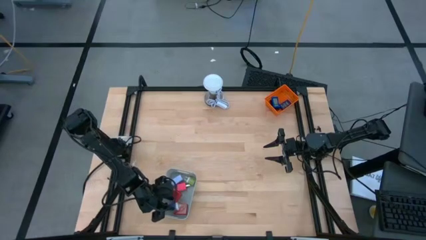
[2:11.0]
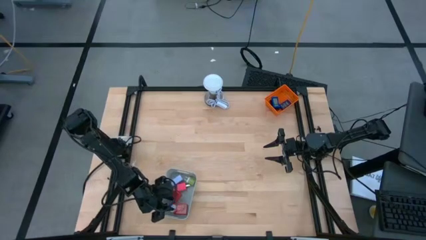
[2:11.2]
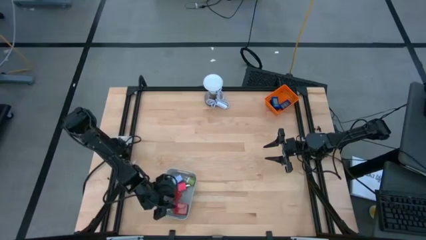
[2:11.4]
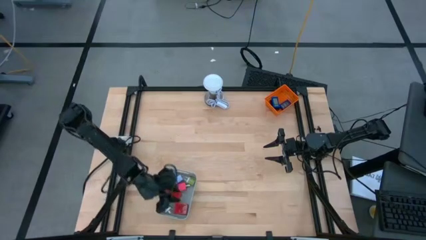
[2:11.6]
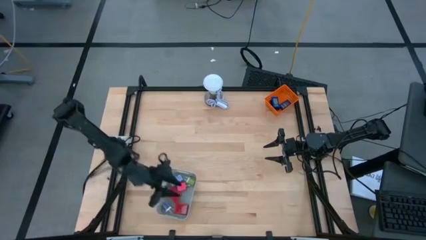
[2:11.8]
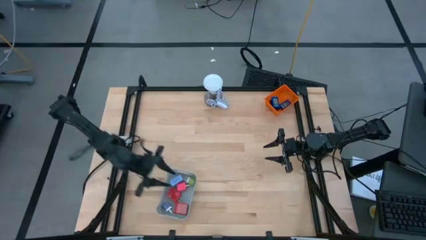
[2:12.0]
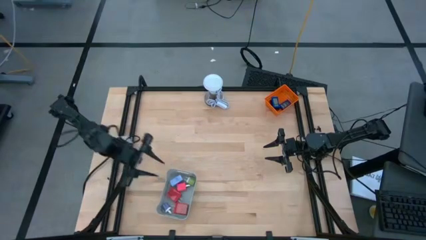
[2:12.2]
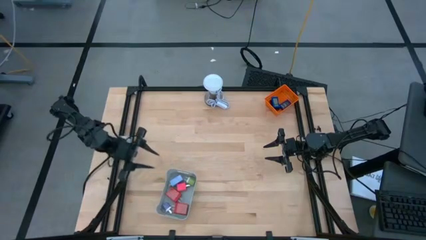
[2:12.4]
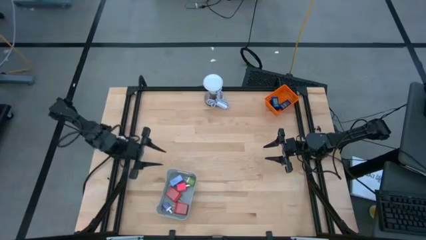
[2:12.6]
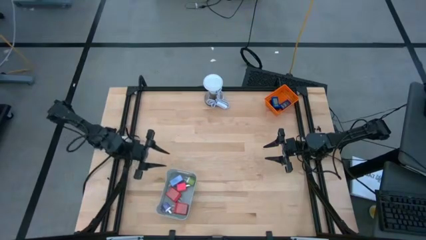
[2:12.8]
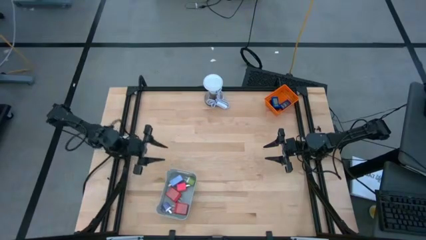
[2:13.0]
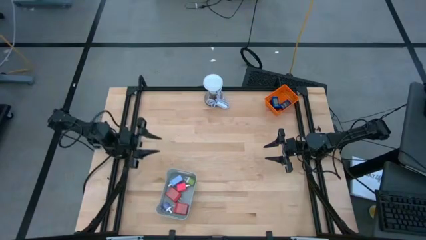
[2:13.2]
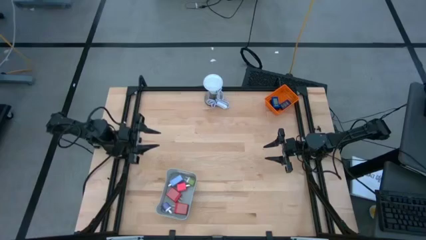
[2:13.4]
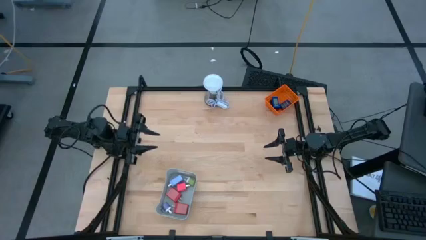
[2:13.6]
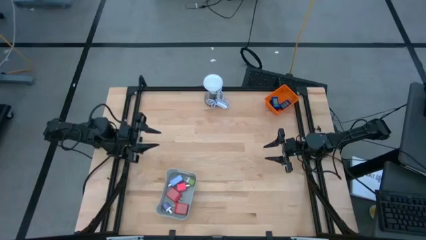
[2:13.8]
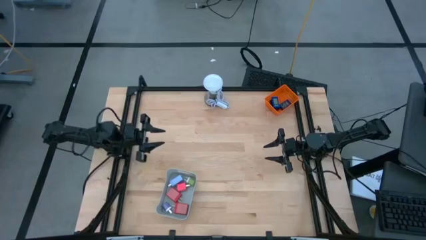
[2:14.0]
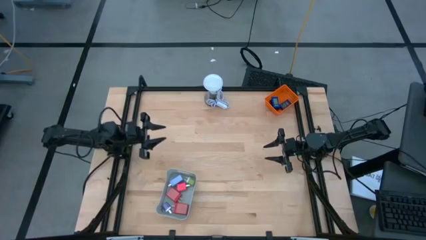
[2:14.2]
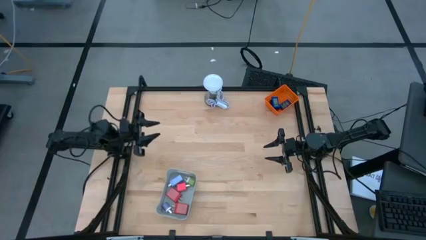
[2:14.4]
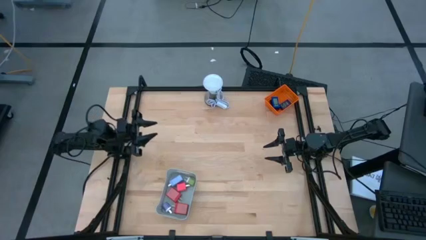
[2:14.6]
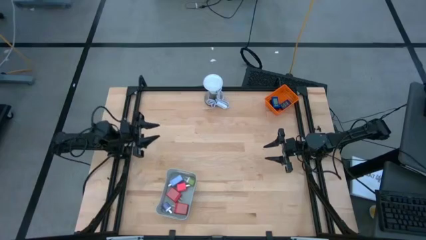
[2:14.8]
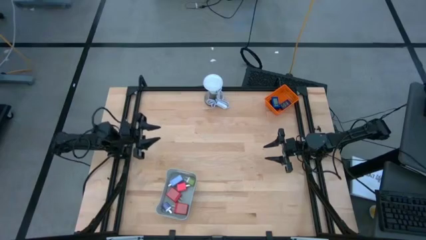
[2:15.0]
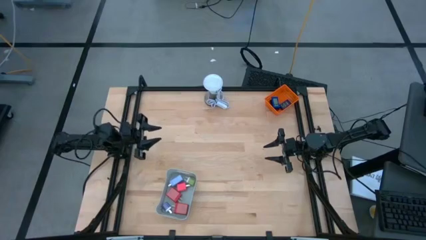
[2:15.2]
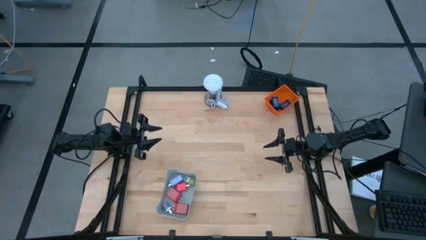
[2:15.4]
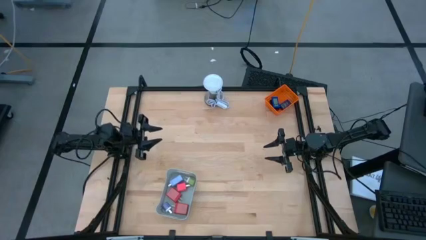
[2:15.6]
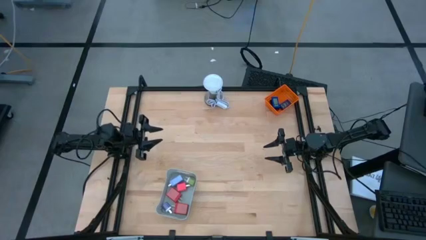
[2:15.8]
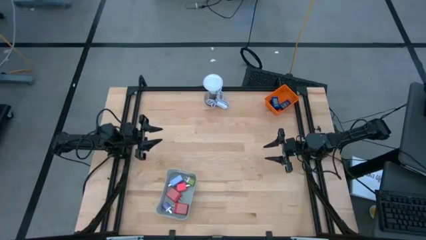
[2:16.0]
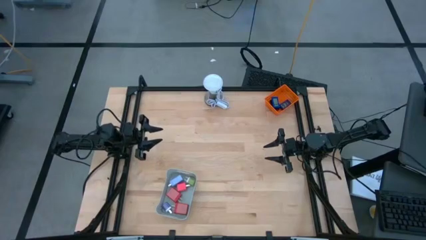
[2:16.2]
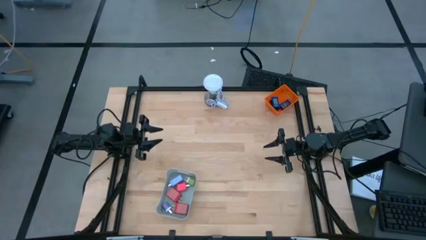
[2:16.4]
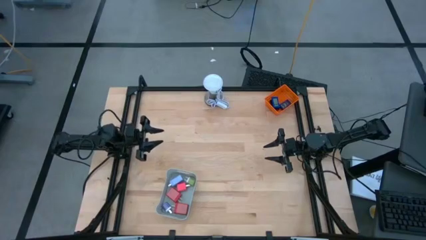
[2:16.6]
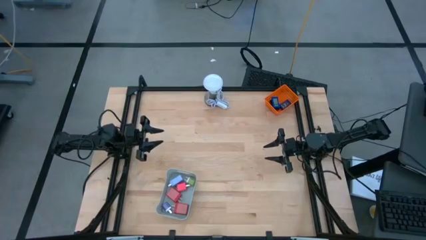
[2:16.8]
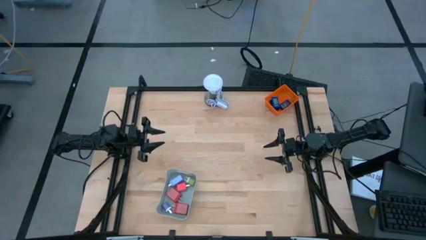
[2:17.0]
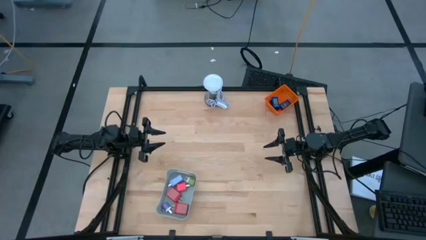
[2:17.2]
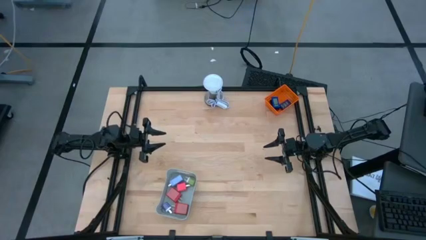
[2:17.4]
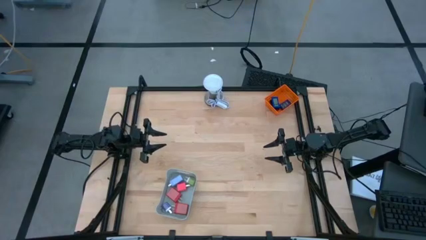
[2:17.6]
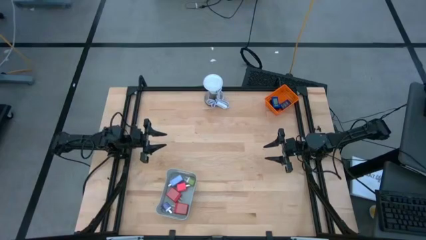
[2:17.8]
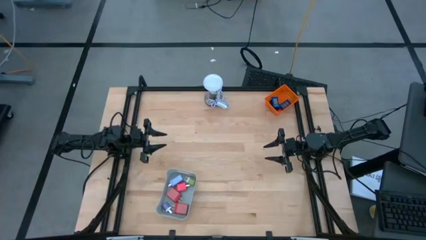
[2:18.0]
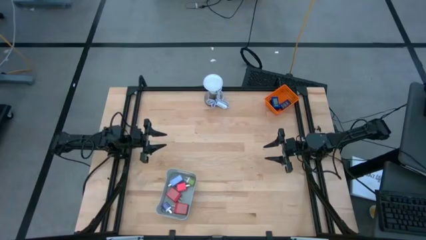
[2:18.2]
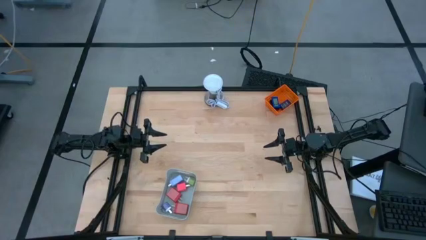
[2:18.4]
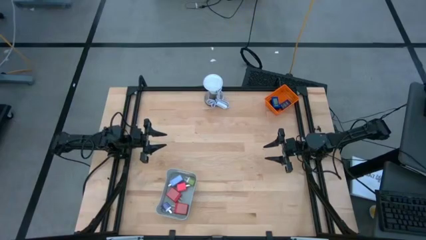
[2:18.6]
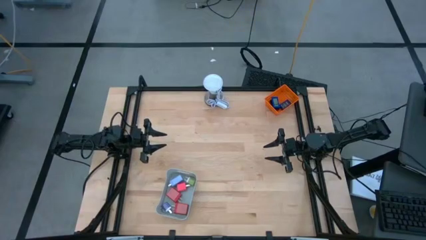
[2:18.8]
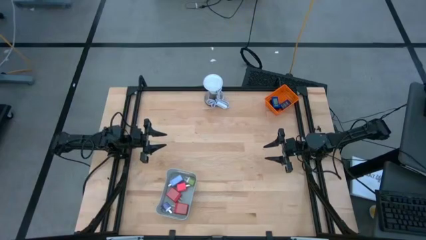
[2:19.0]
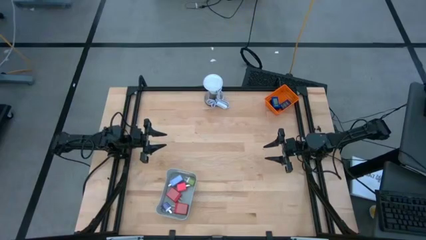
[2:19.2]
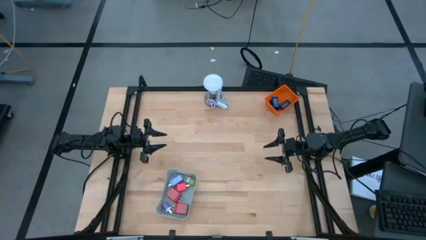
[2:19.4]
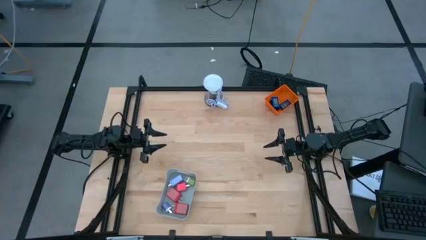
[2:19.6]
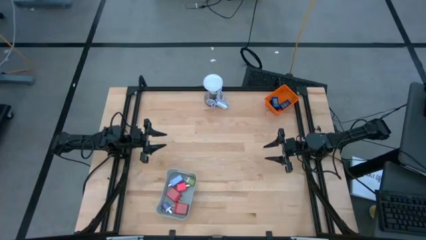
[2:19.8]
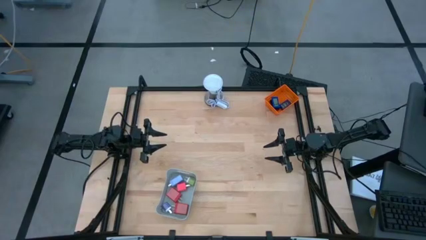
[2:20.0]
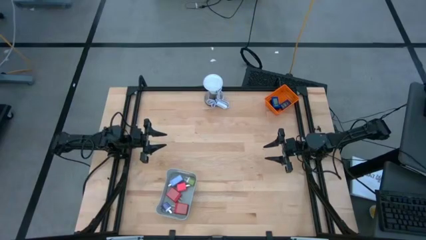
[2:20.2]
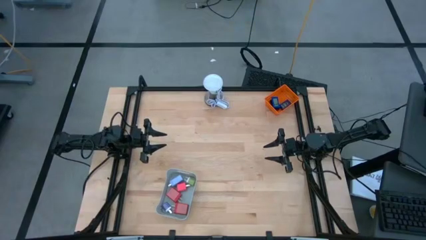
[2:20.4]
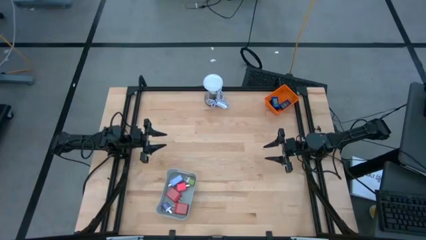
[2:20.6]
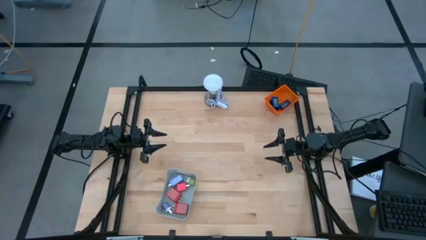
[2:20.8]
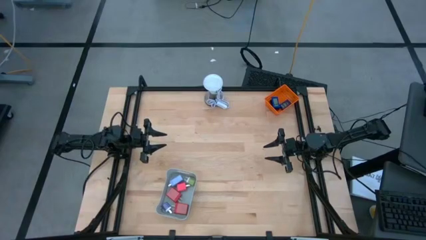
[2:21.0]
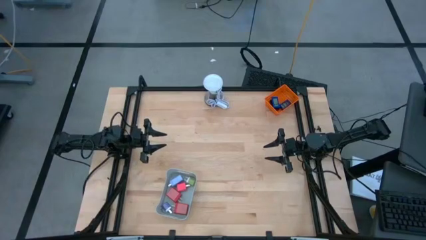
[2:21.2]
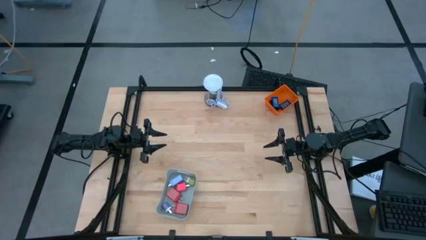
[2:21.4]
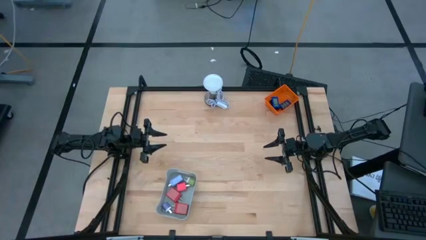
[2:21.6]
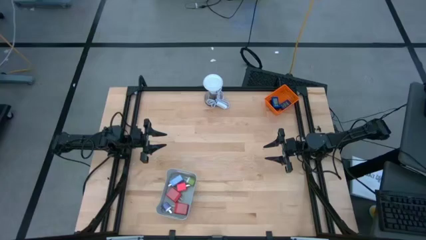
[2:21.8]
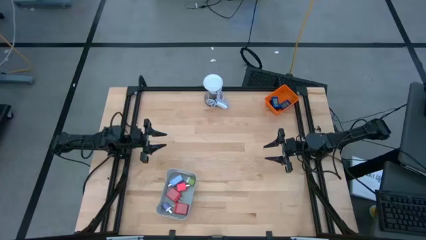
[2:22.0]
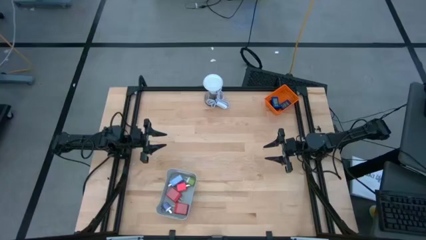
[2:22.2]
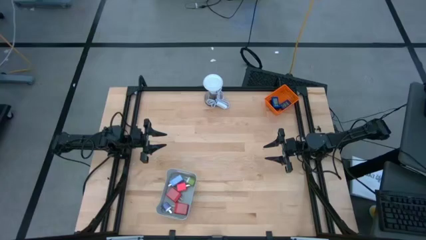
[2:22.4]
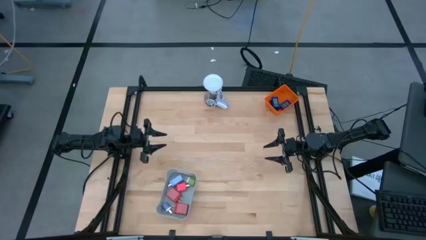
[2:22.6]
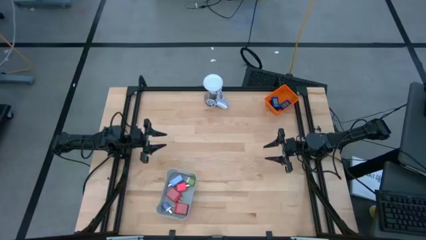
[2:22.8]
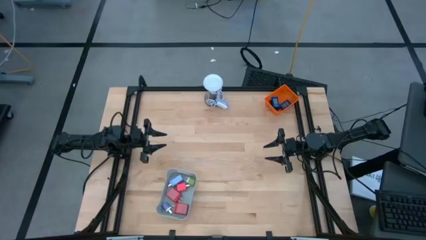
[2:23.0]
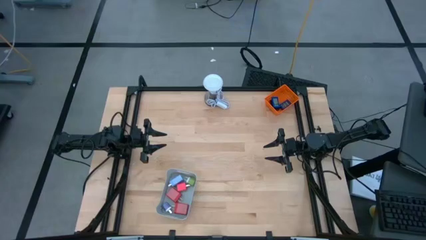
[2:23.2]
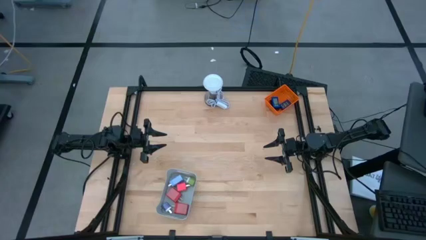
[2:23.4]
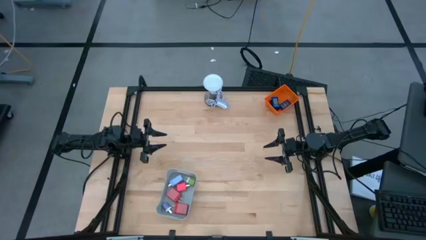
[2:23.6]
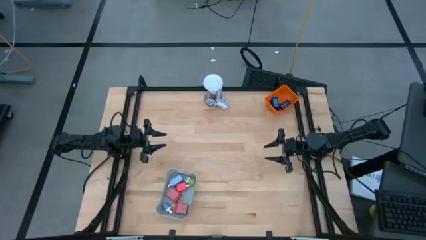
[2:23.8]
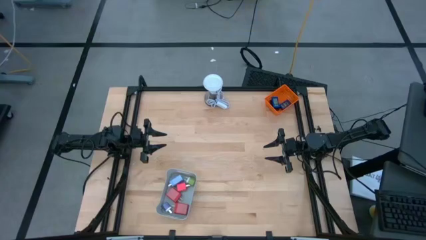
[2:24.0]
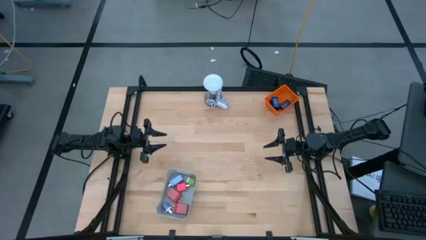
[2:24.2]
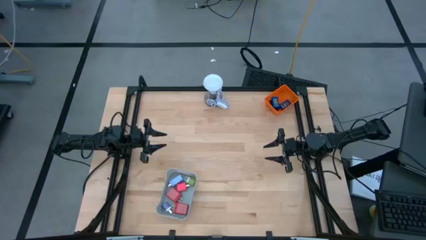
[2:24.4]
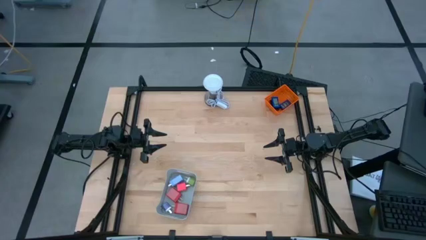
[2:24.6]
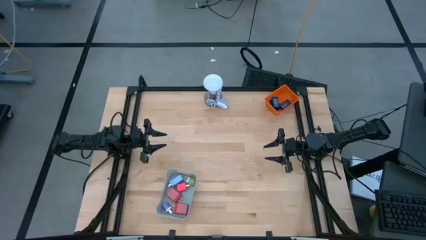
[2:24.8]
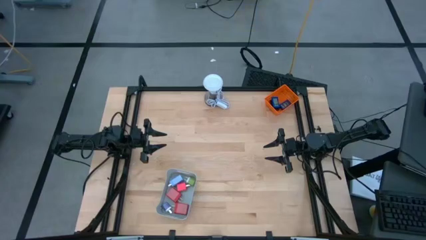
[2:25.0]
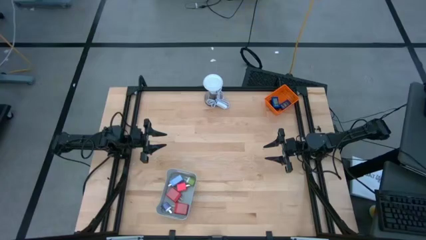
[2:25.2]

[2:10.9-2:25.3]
Task: Pick & Place Office items
Return to Home Position
